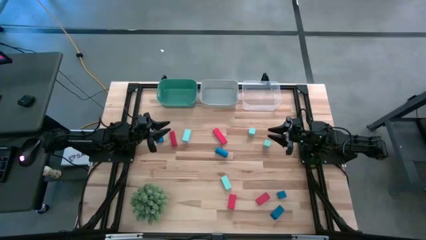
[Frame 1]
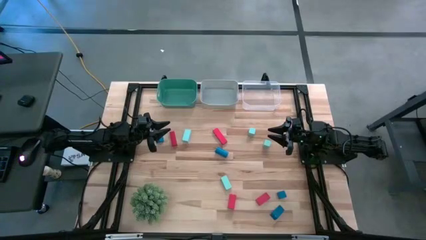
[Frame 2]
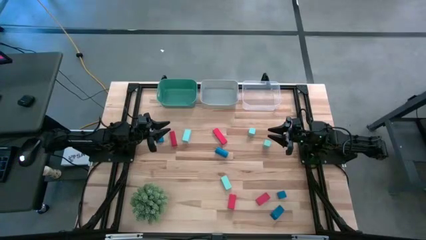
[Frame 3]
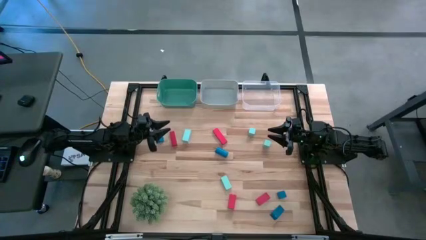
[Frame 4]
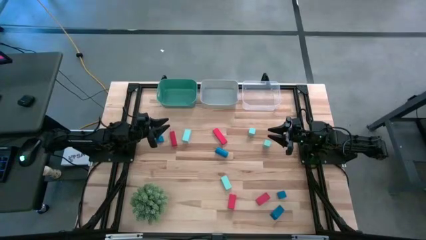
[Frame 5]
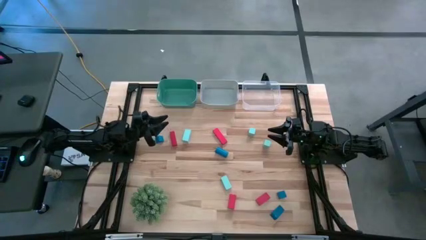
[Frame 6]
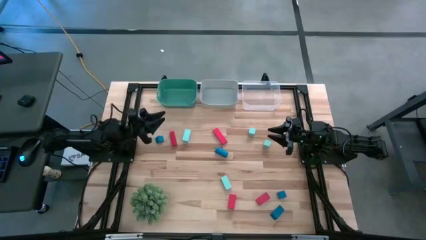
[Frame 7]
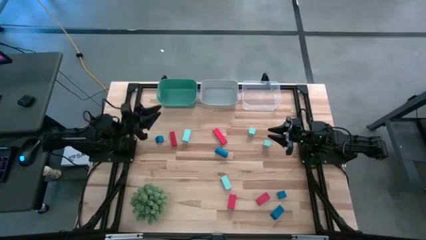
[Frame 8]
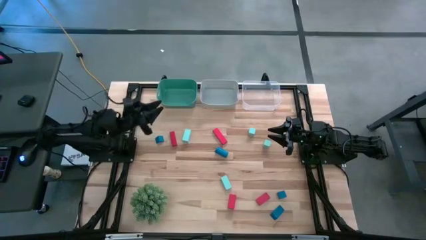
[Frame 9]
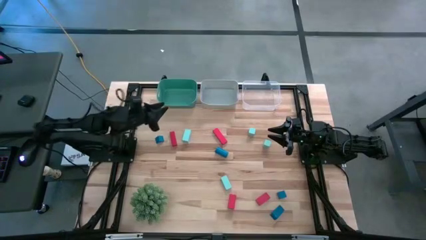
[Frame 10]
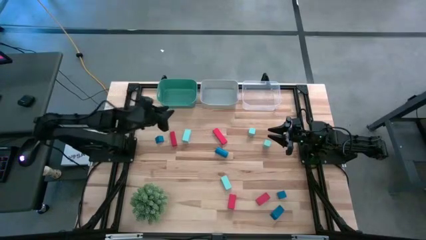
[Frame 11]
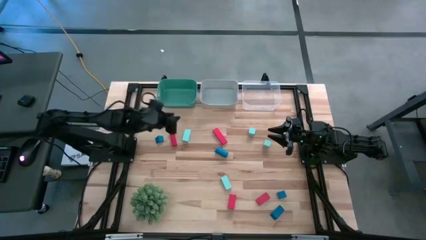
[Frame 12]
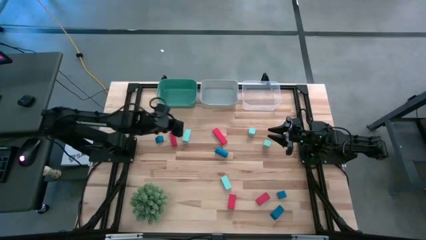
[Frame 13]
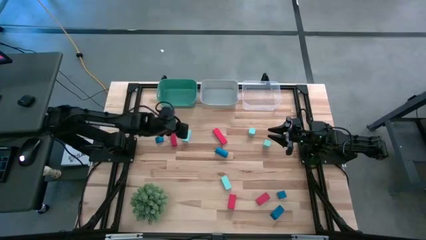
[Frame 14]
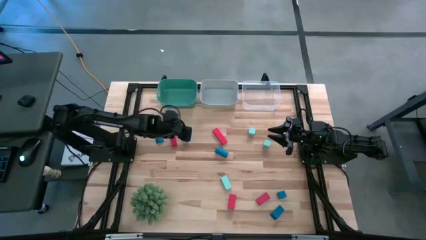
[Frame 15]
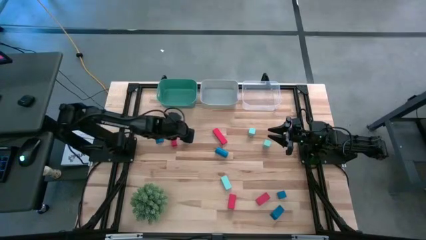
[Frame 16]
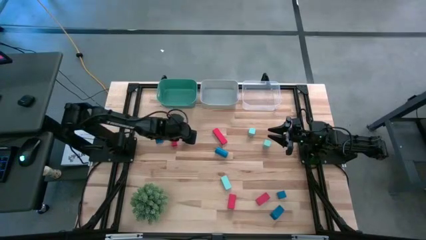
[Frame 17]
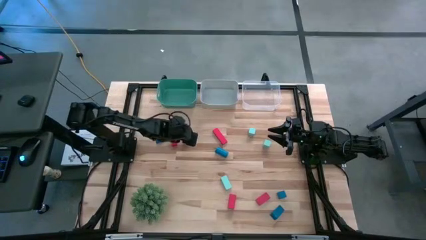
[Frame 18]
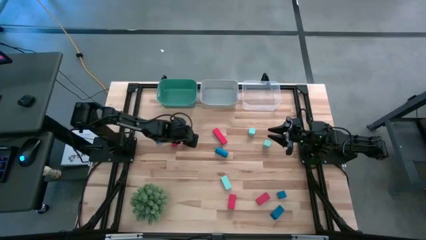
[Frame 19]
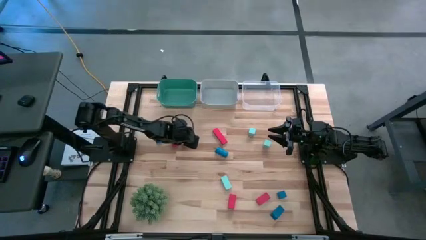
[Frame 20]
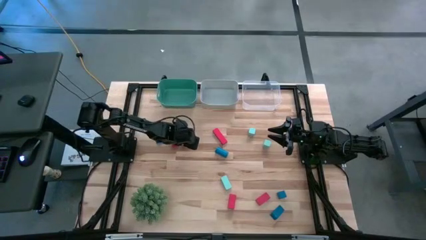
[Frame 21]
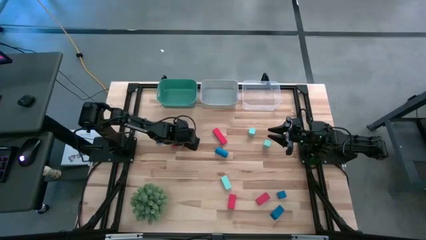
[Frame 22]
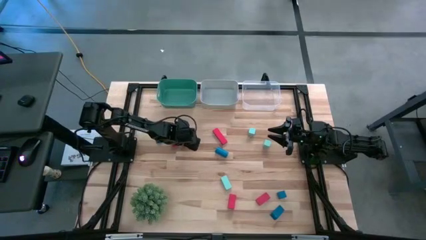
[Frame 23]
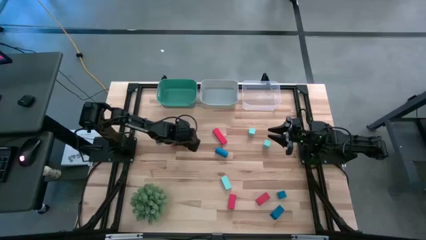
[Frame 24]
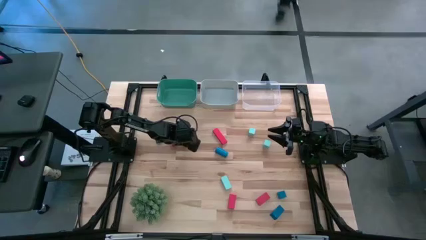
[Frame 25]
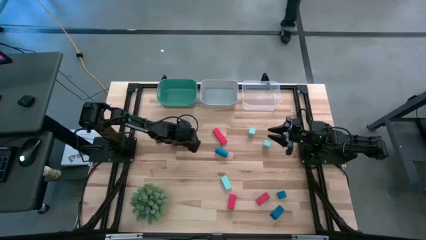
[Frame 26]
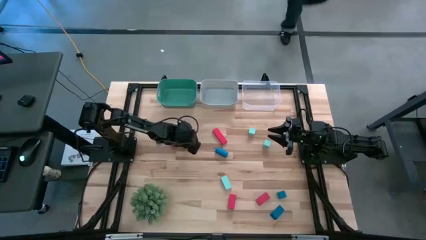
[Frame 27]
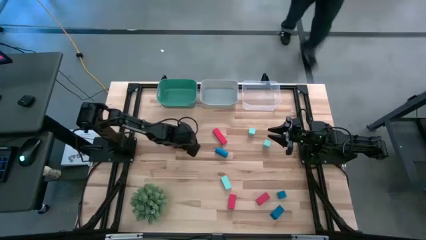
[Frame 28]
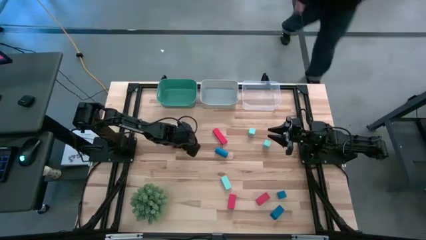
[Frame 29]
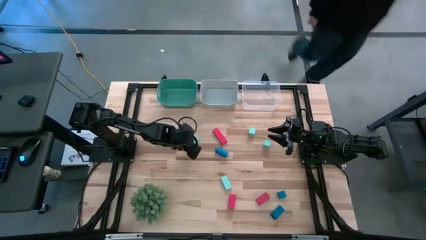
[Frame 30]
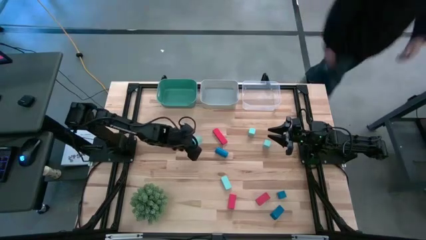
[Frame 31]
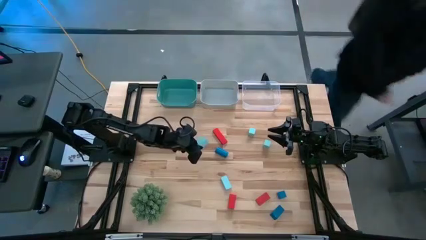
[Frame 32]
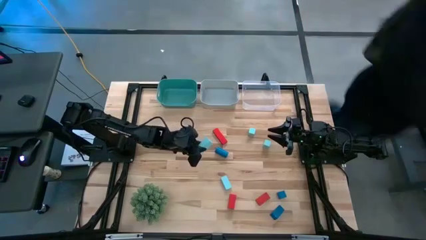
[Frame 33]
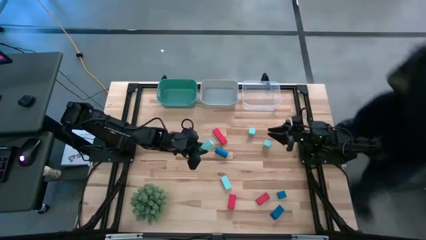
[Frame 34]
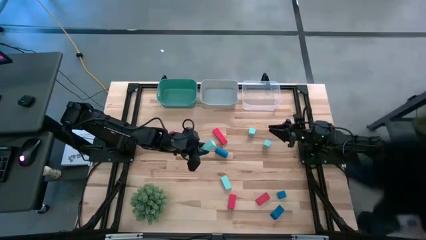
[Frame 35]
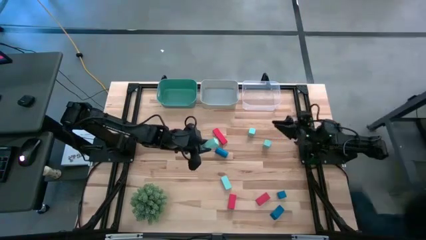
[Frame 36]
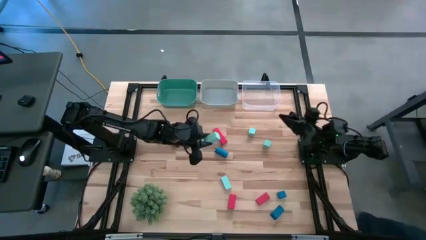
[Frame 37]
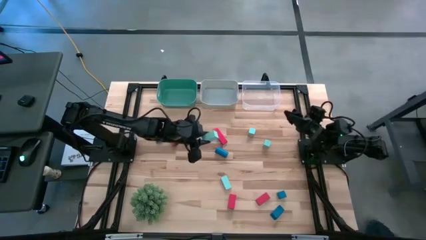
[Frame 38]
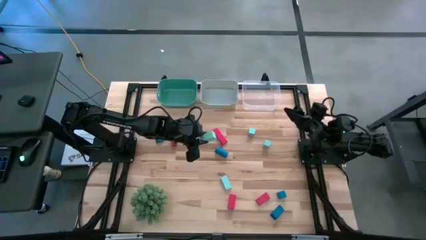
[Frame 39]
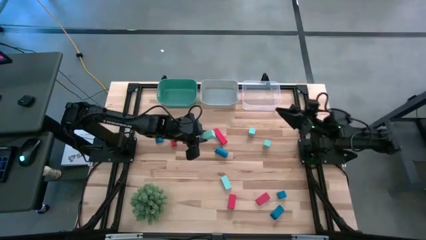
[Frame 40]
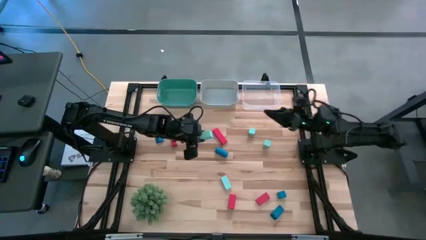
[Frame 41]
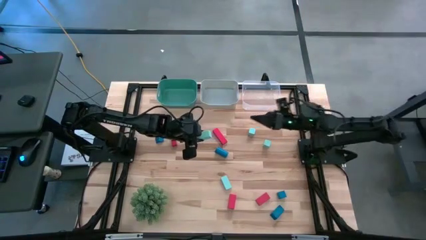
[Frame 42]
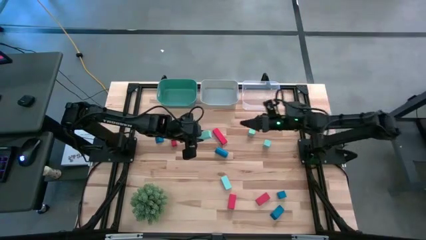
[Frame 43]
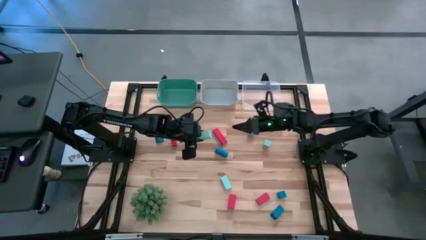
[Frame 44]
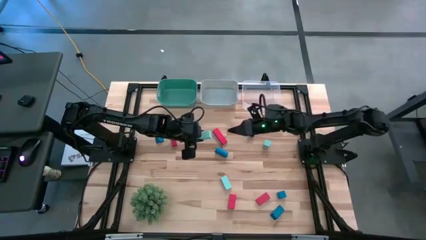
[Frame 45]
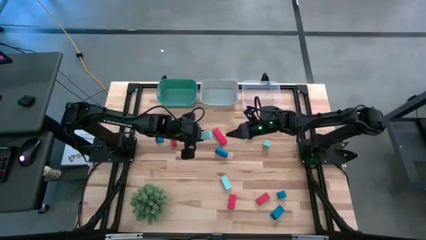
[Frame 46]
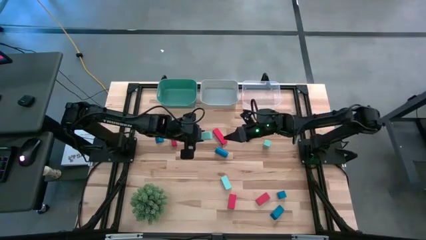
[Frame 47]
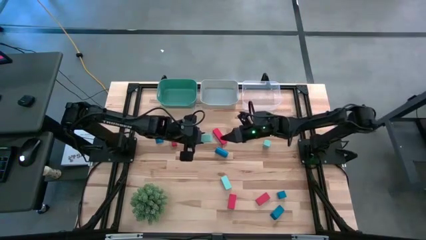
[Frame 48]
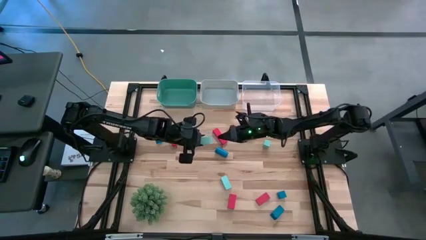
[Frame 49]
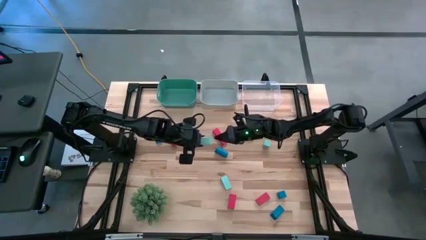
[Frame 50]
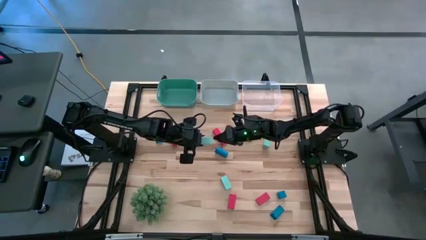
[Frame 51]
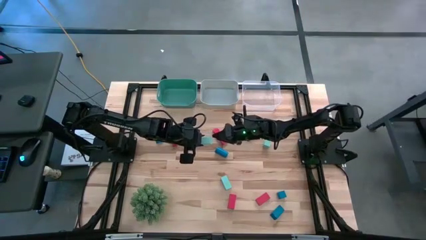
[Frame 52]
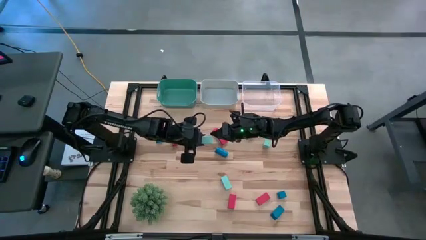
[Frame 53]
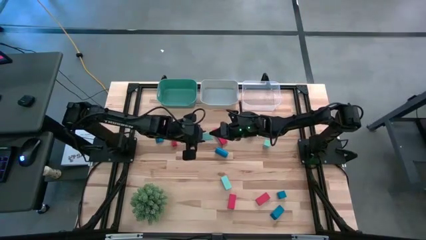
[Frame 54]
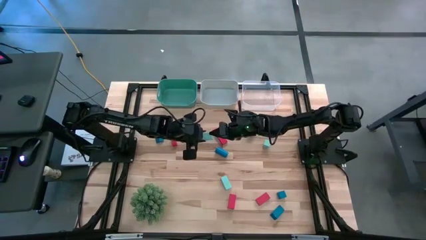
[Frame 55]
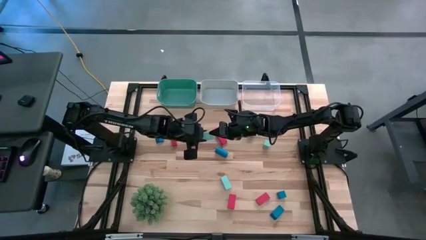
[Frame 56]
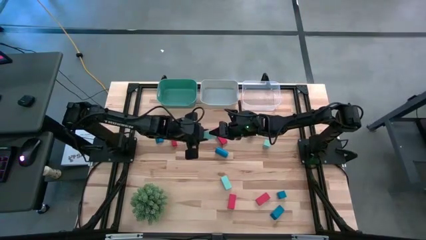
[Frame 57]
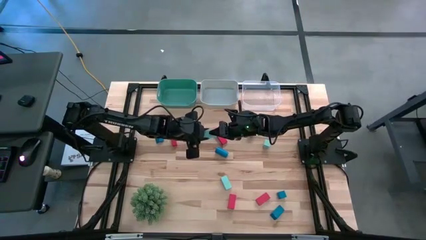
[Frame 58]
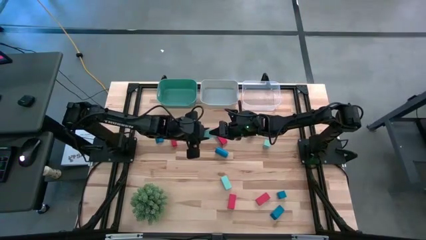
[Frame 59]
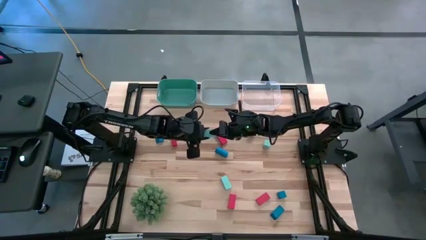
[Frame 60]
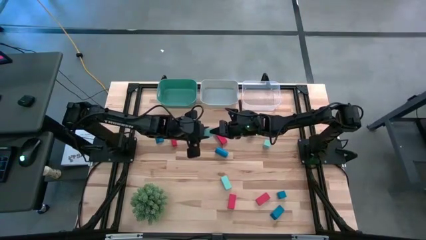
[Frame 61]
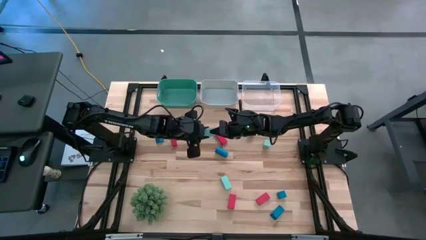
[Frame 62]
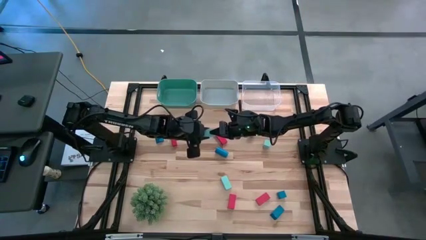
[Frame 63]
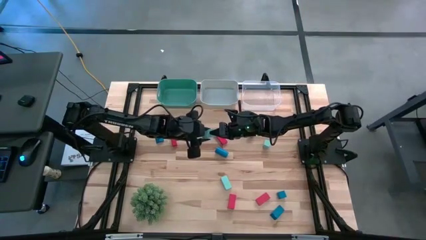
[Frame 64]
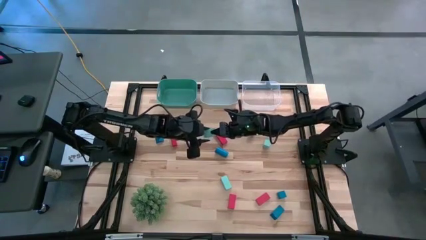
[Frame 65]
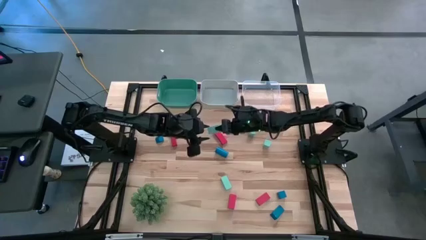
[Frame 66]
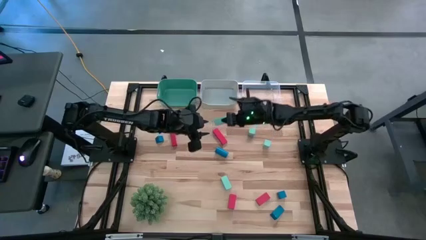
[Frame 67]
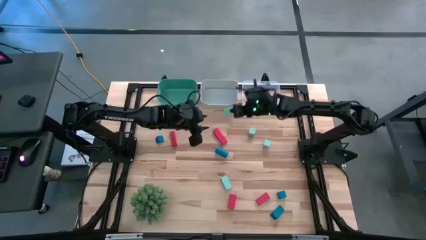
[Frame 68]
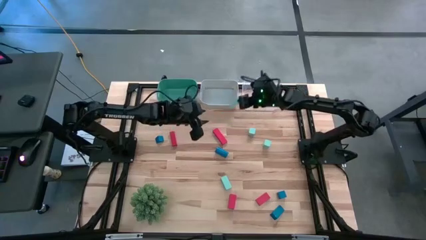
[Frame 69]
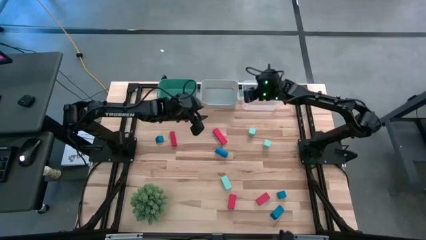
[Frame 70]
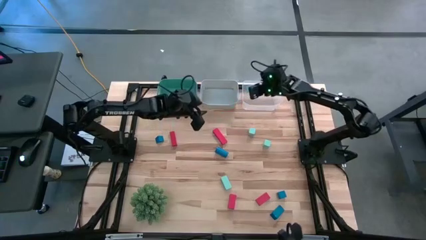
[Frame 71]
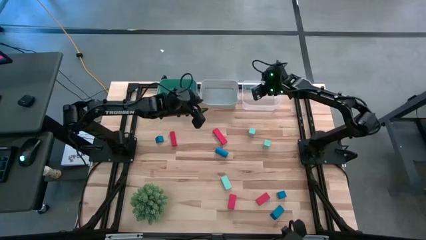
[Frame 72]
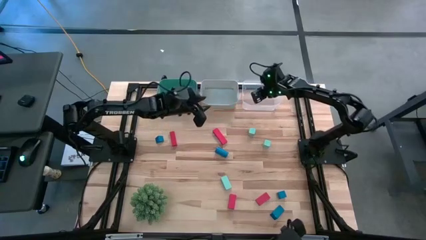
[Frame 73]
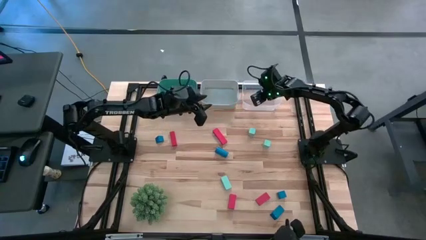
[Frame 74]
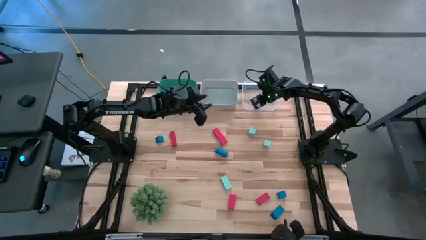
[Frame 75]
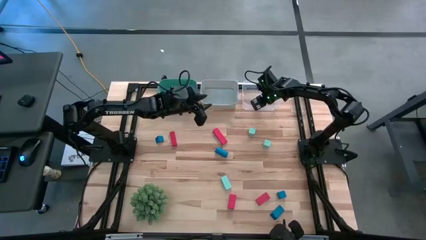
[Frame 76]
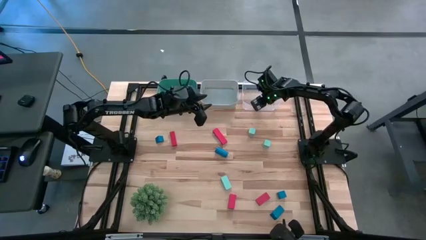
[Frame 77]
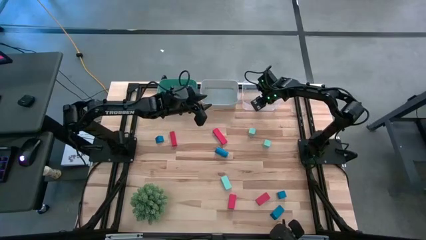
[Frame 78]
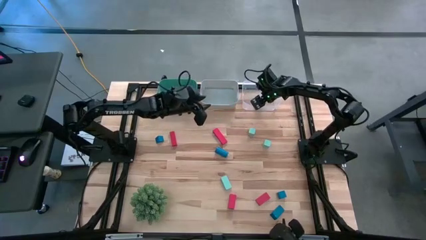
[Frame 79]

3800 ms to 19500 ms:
Task: Sort & place blocks by color
Put the light blue block into the transparent bin
